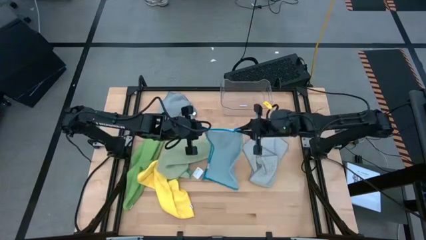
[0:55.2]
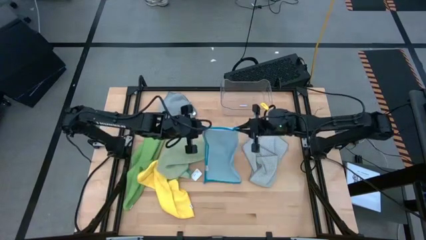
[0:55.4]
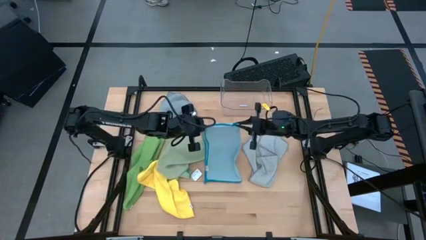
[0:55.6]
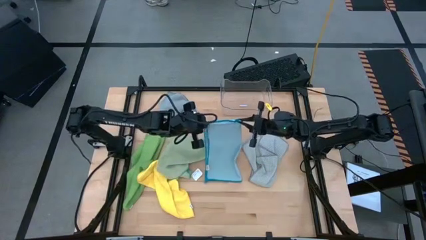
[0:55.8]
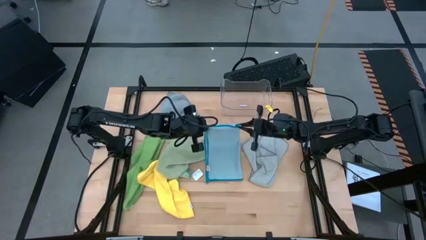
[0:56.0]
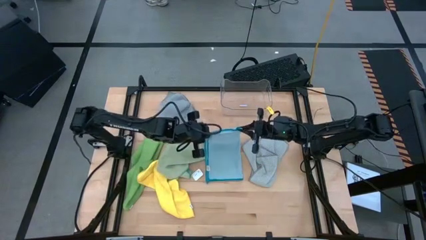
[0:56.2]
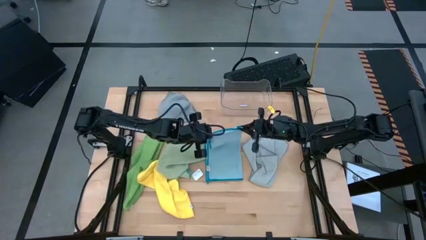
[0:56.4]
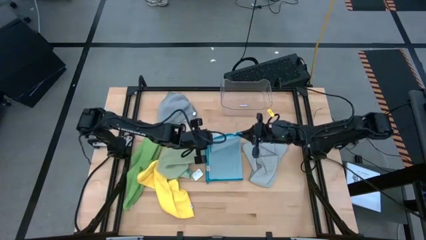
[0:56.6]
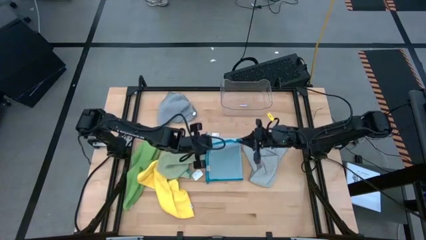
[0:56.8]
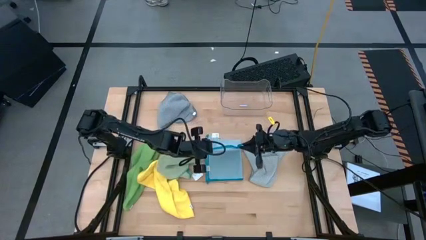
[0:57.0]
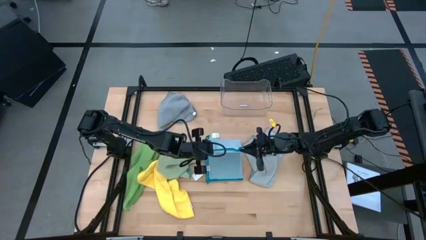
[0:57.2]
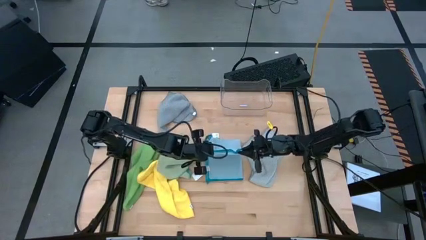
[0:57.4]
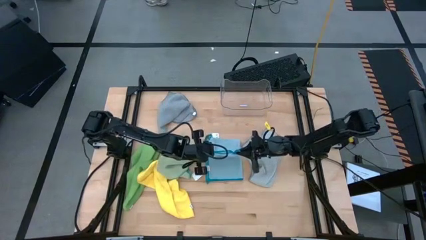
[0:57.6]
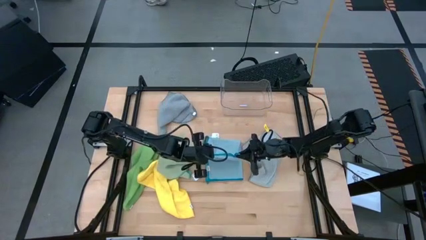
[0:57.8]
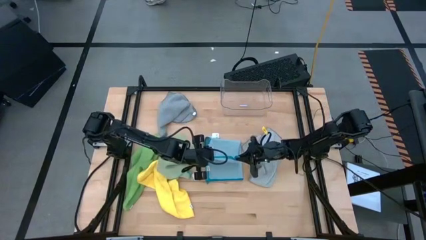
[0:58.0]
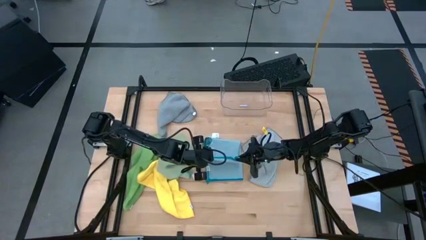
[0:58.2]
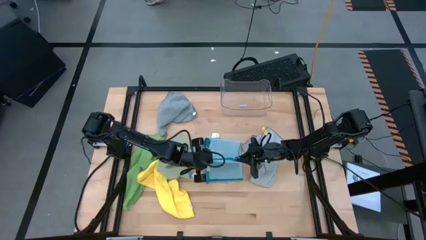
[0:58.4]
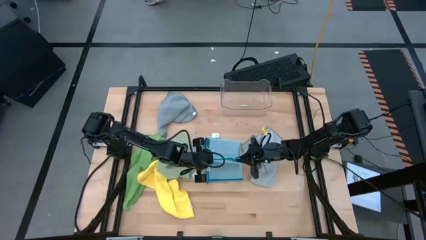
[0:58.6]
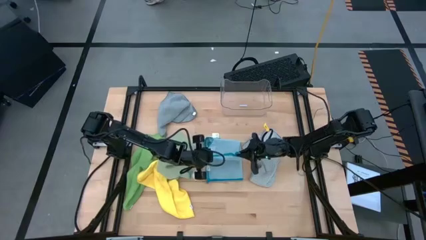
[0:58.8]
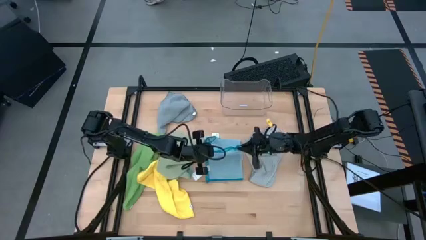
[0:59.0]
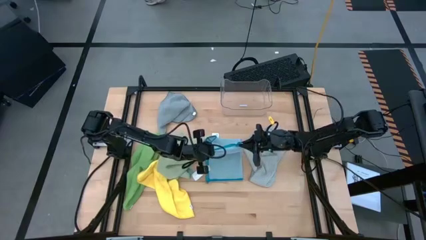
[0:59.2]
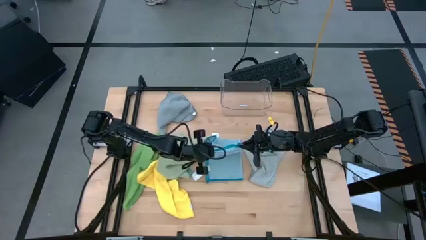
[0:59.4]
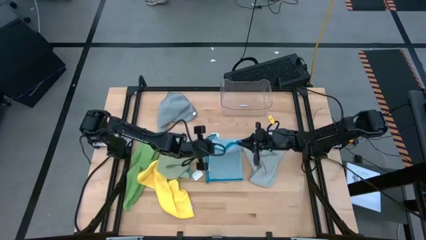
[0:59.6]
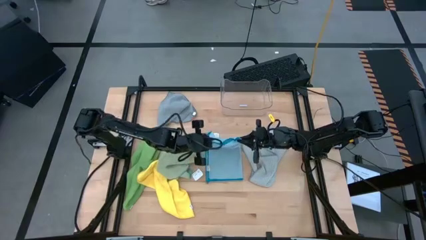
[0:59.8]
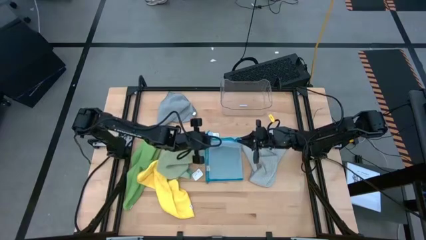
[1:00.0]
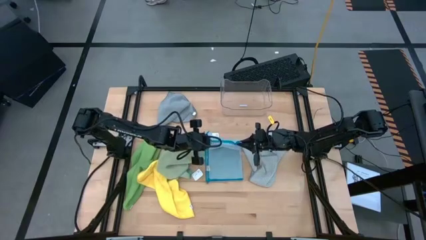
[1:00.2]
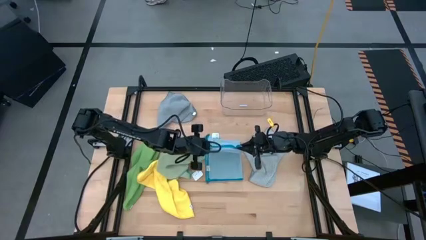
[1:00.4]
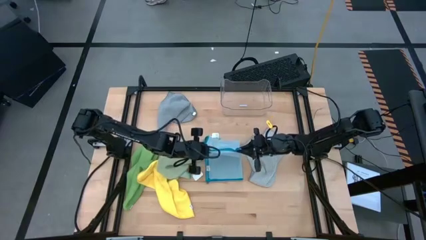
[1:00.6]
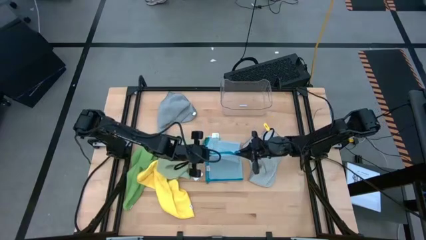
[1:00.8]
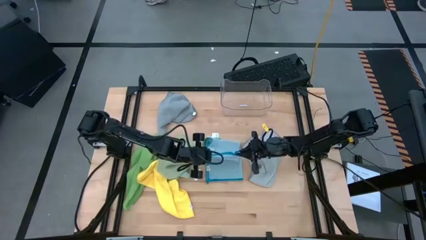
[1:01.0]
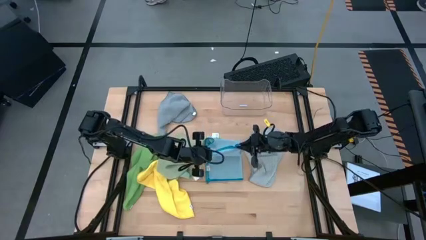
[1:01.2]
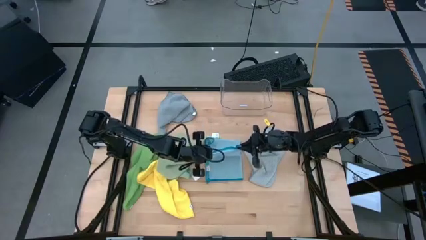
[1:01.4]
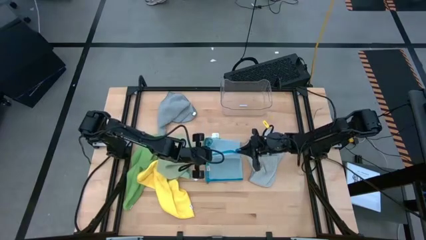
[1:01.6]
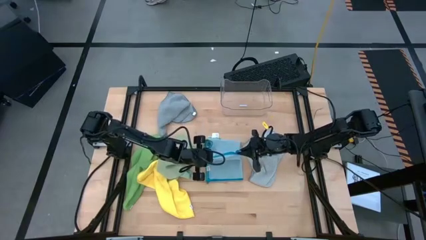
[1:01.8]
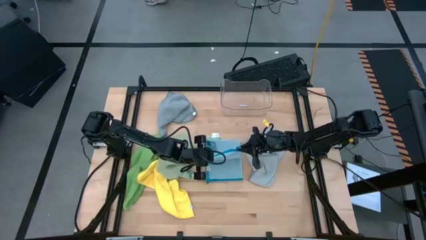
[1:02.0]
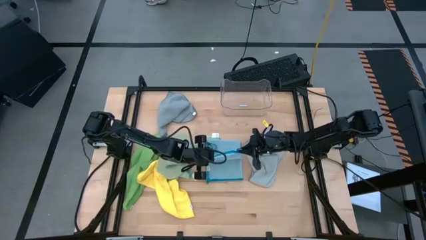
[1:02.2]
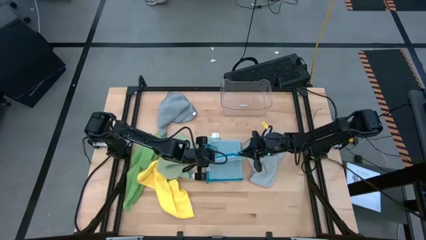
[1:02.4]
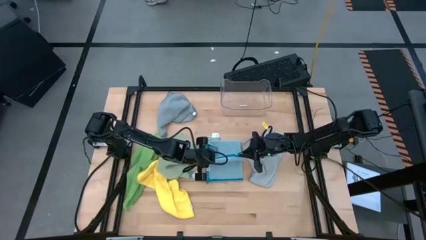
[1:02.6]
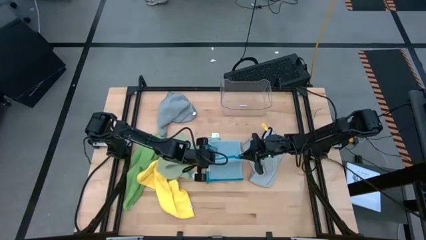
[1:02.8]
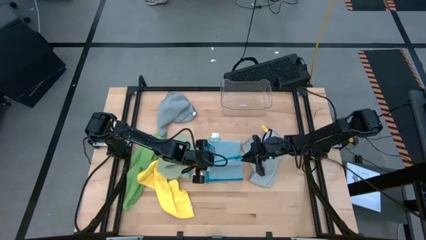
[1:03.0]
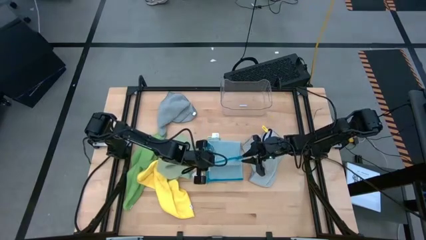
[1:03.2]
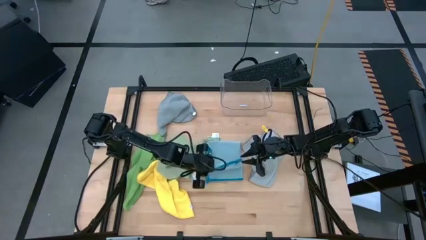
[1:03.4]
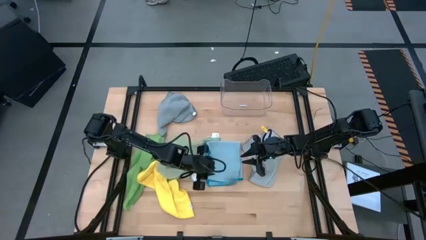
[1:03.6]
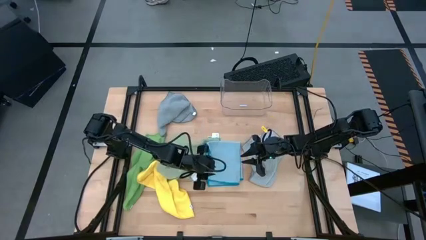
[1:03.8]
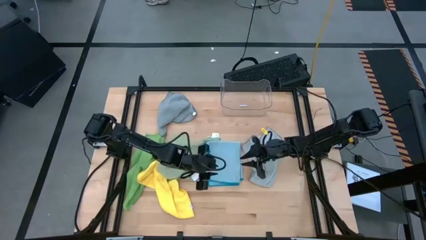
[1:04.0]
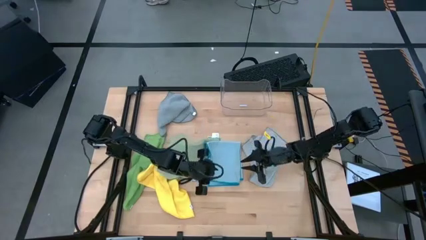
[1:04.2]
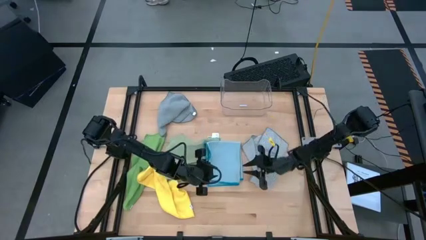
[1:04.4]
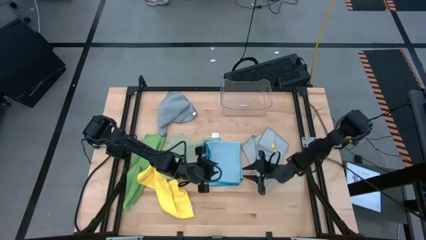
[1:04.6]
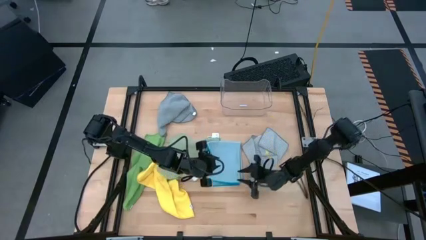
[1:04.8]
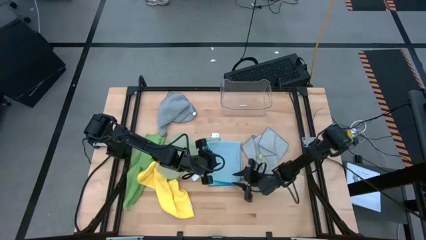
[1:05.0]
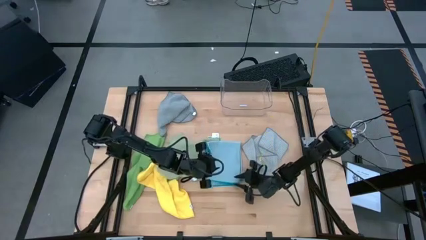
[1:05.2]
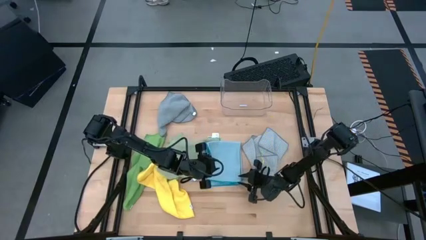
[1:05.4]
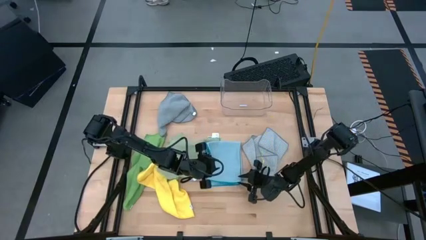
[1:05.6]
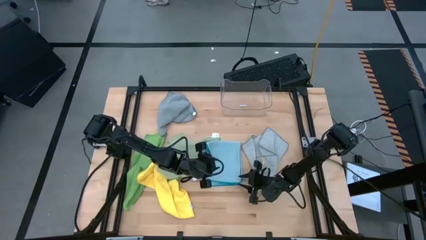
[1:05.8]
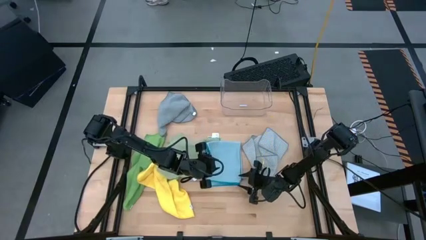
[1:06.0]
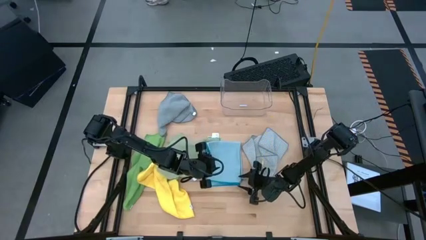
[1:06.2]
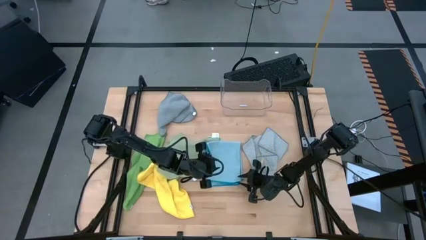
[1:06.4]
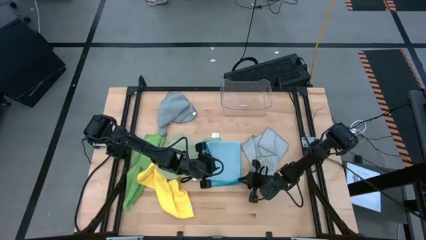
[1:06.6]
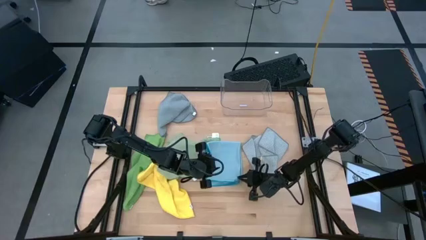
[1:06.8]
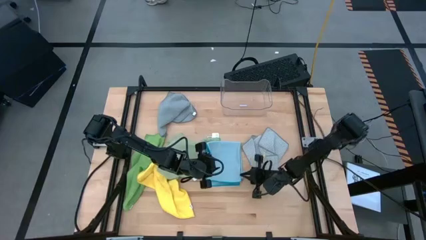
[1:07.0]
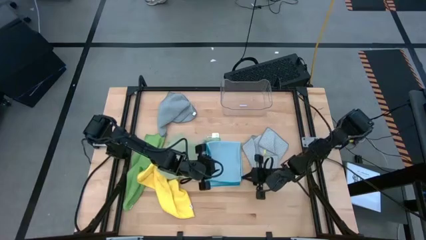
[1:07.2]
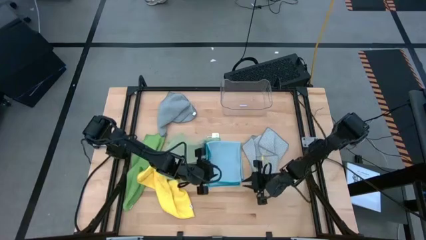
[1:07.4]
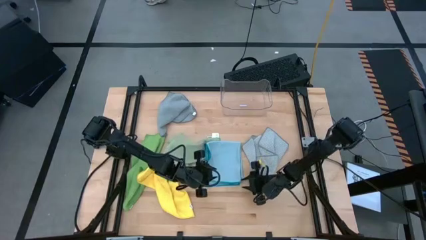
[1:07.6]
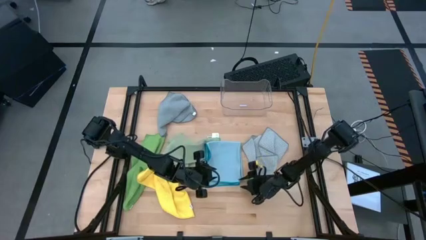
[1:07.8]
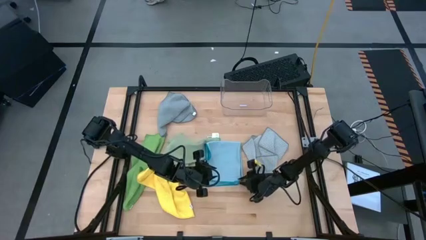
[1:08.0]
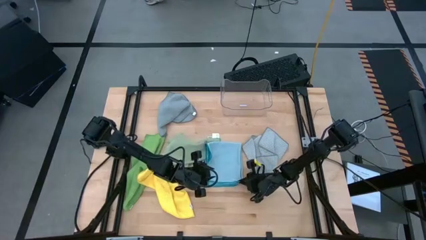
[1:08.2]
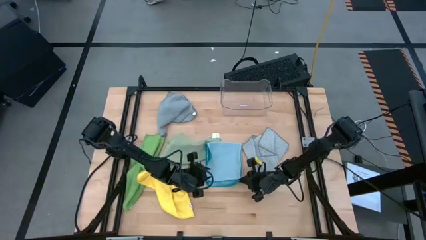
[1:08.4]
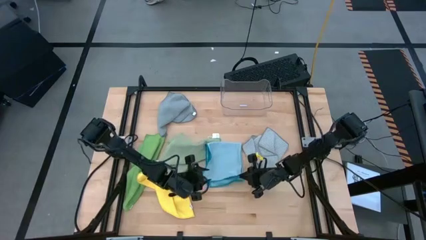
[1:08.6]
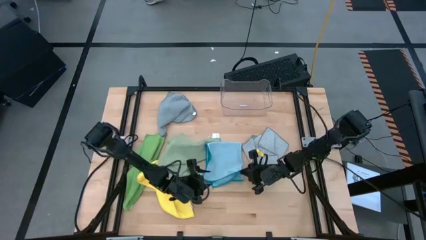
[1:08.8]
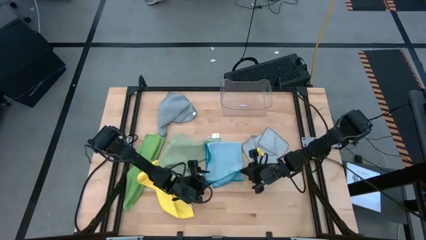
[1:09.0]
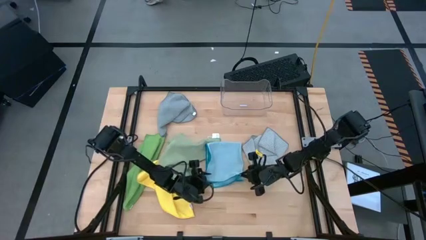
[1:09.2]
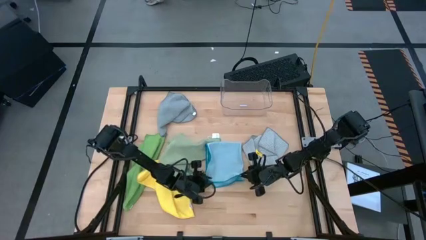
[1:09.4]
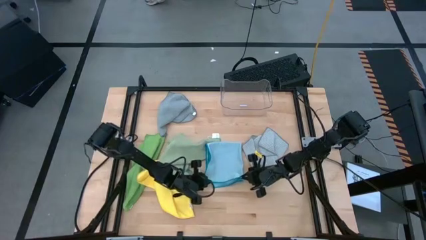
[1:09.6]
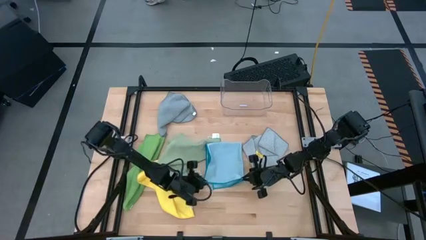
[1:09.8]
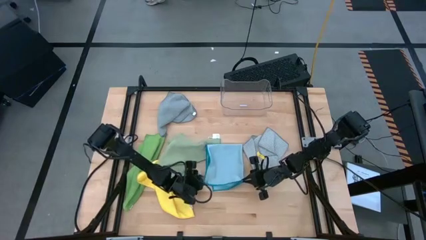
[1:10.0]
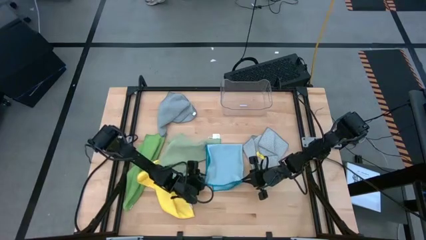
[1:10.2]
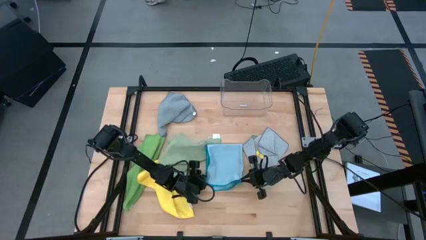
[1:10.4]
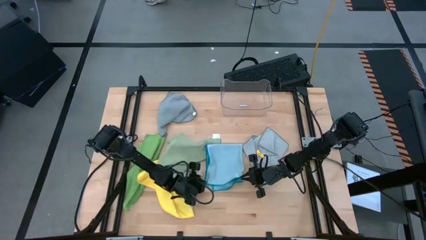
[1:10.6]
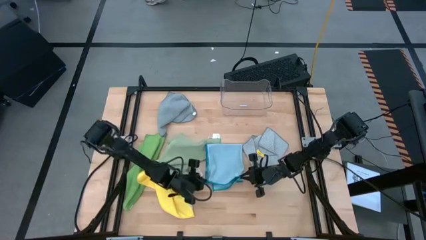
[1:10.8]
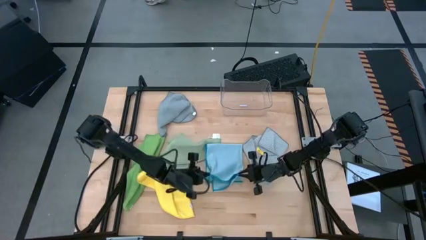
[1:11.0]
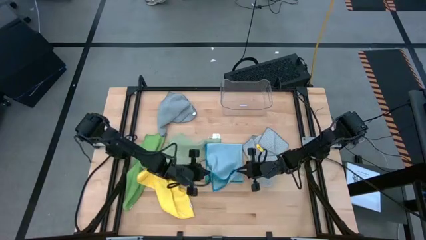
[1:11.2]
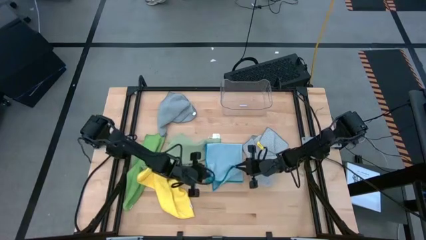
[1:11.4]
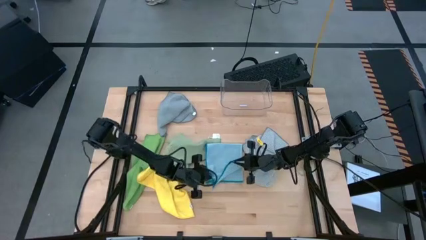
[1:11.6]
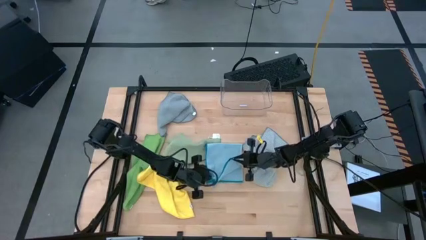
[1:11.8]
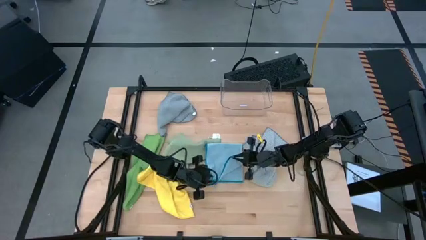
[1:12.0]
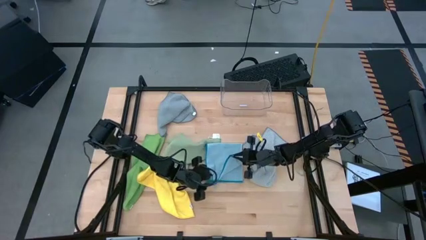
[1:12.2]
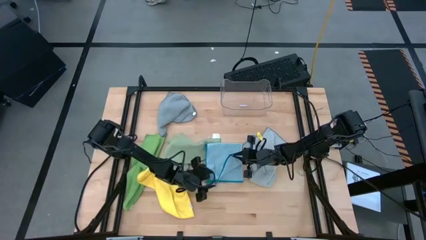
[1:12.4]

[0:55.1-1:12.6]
Task: Fold microfiber towels
Fold the blue towel
